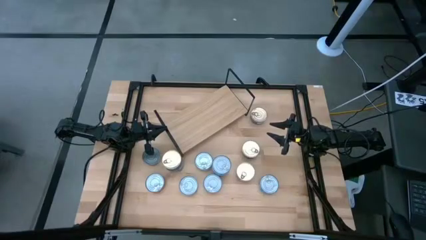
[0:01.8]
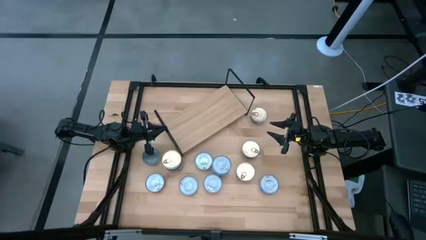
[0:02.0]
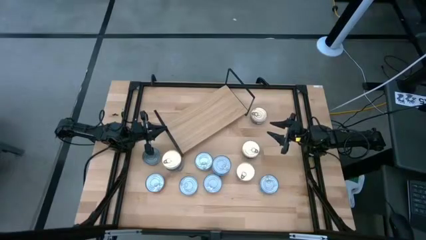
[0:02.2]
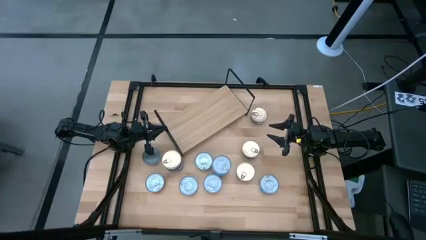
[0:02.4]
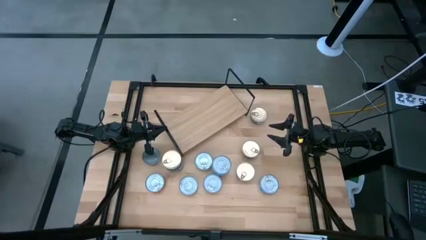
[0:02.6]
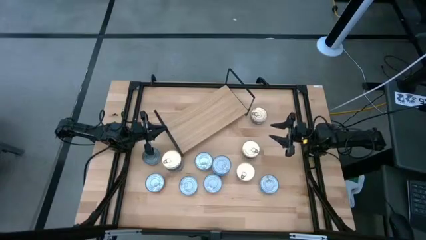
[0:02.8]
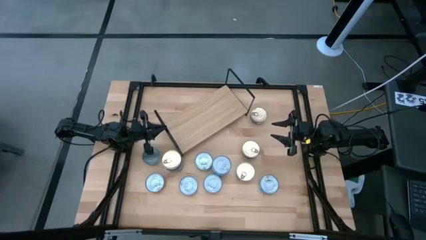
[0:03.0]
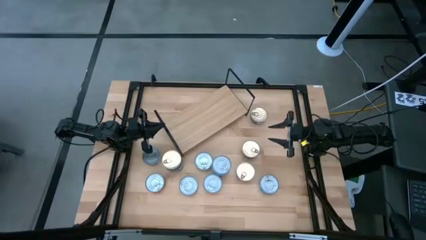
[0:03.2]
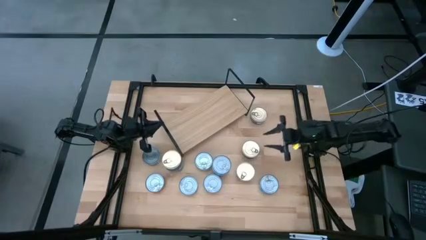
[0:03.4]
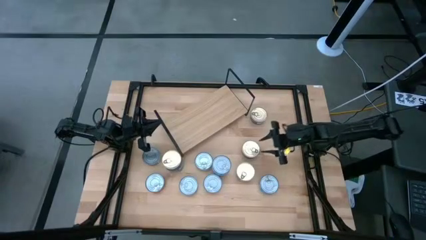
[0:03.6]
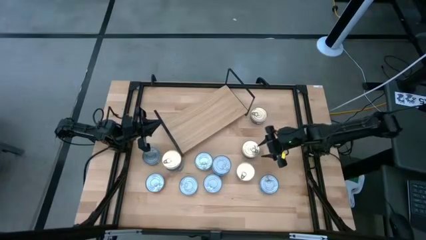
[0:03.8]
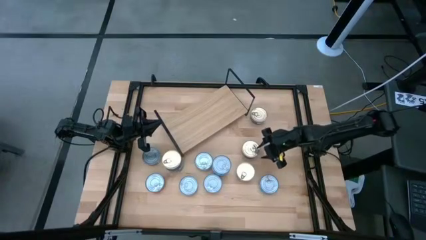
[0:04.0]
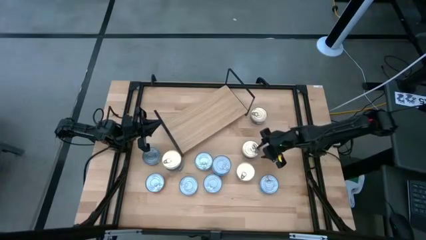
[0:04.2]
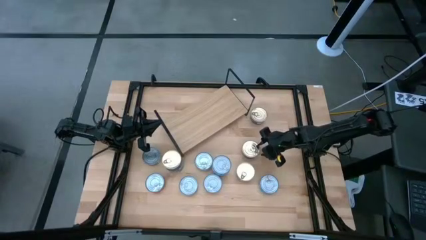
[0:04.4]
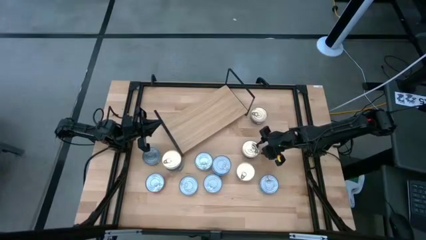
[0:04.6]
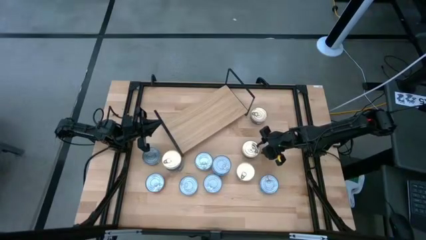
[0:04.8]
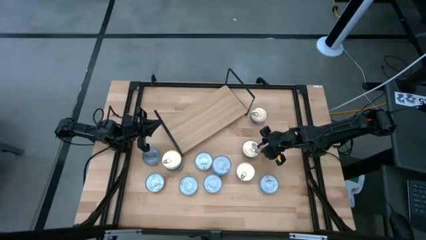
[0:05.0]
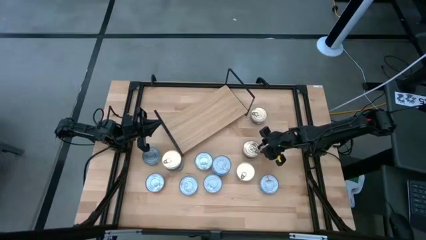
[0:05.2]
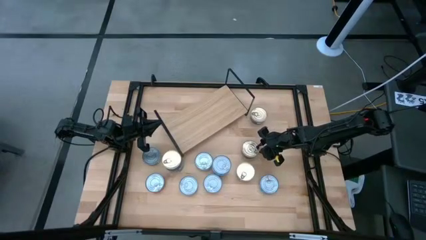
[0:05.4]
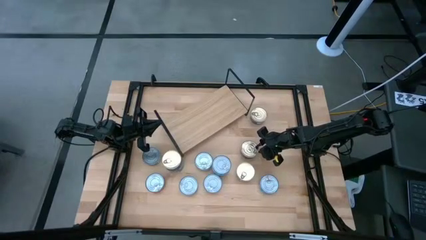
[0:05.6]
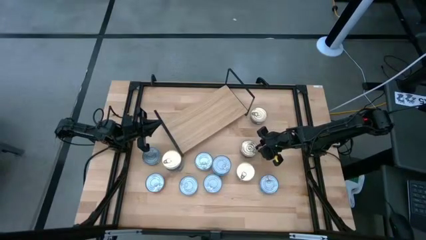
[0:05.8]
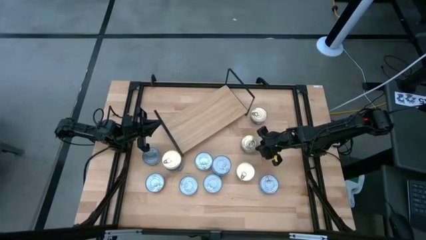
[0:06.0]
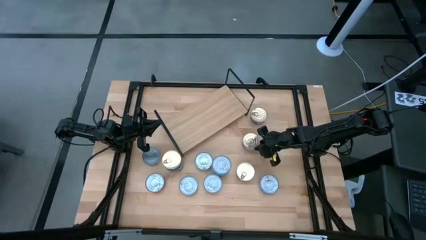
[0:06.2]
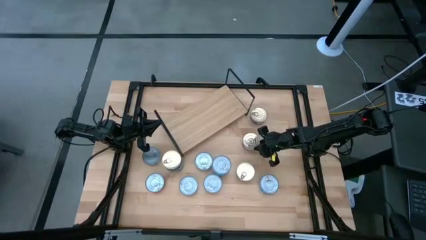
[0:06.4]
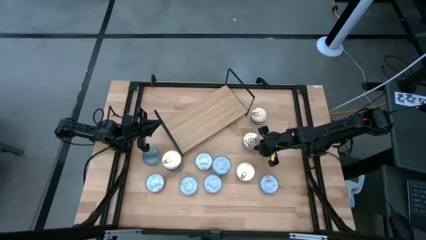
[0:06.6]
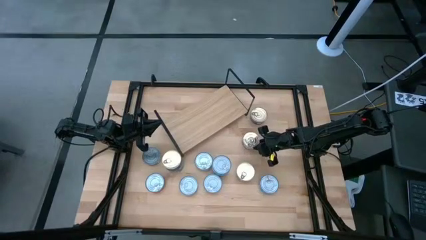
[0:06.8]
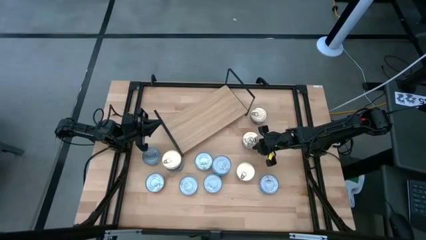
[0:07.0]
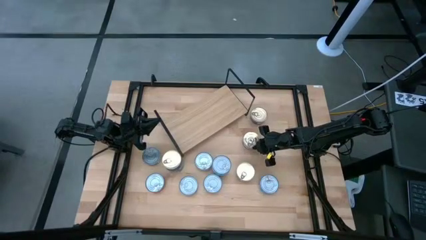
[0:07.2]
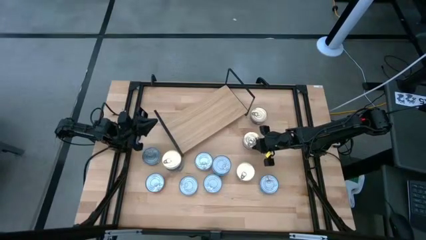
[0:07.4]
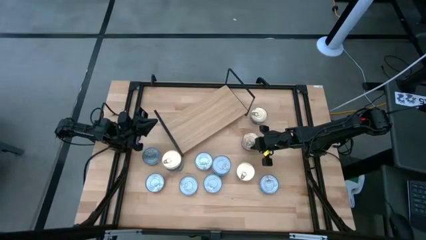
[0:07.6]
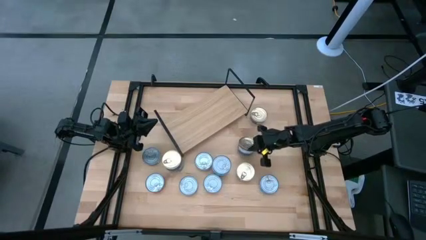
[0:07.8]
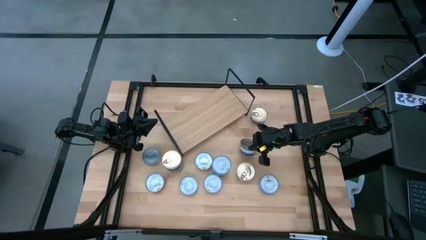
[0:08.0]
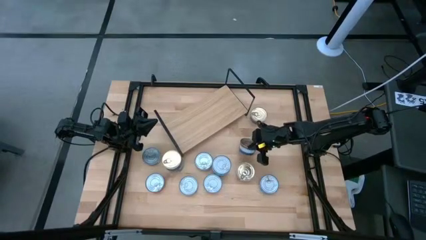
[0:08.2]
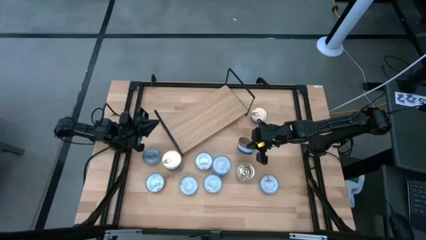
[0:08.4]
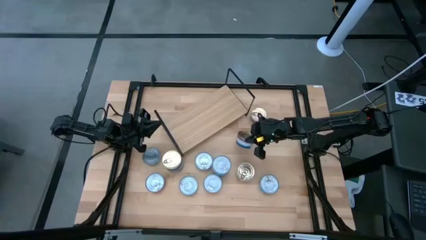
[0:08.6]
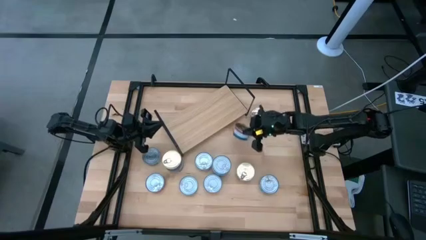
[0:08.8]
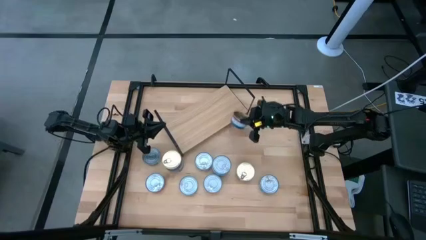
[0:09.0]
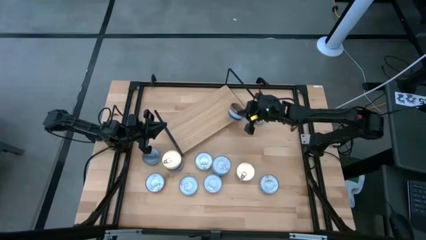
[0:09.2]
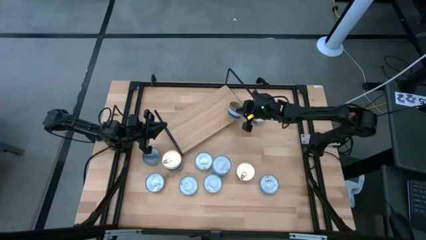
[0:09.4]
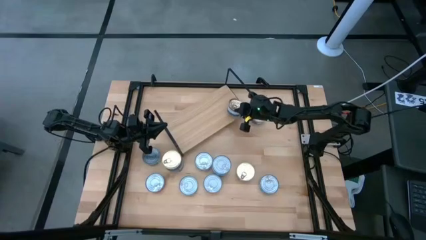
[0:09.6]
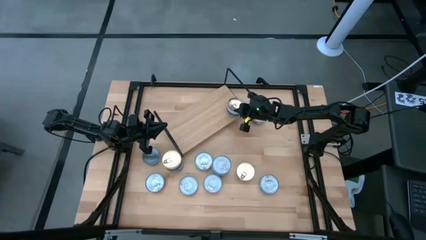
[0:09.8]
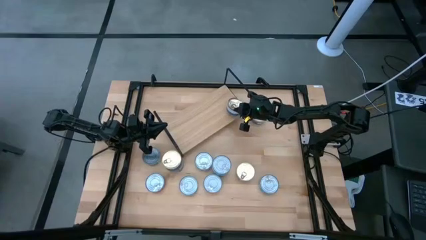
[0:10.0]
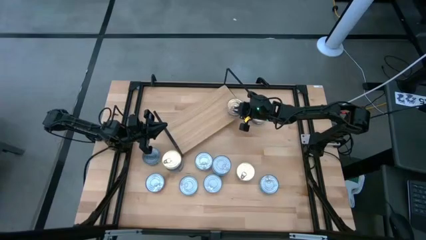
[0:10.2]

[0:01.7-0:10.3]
Task: Stack canned seafood by type on shelf
Put the blue pink tuna can on the shelf

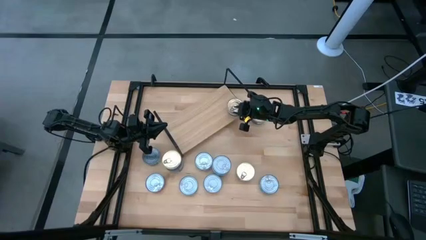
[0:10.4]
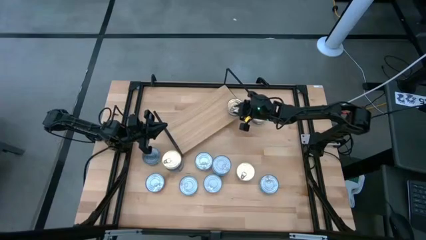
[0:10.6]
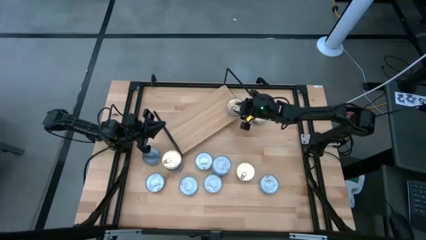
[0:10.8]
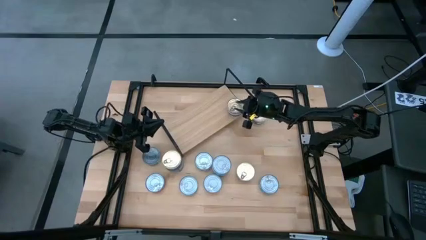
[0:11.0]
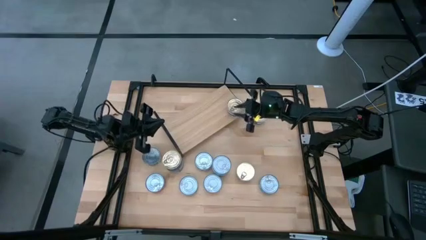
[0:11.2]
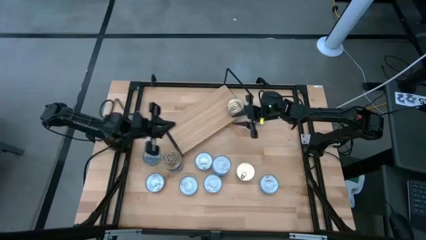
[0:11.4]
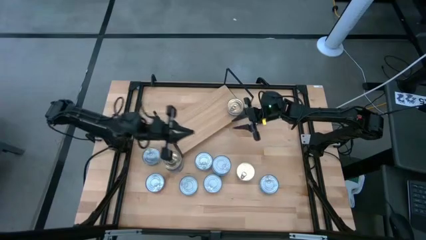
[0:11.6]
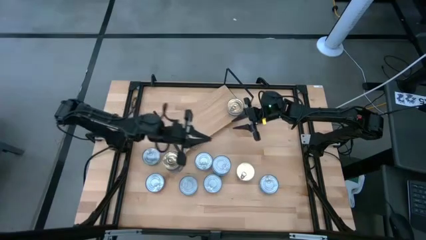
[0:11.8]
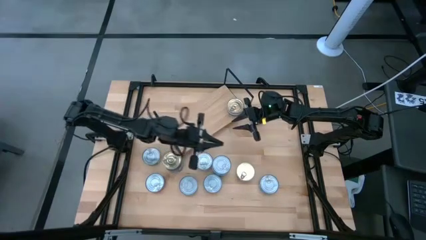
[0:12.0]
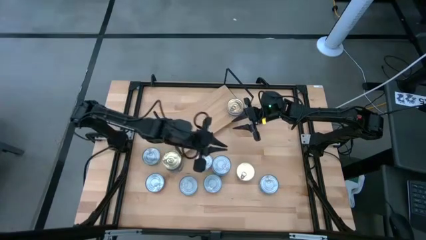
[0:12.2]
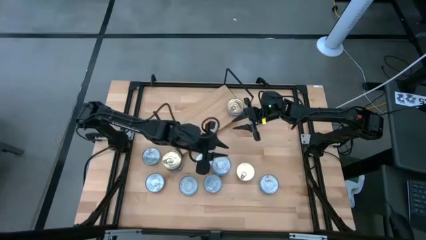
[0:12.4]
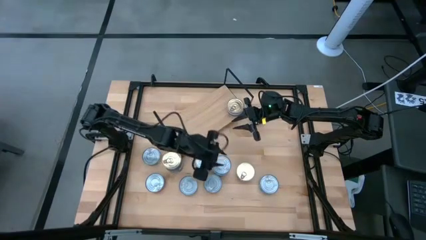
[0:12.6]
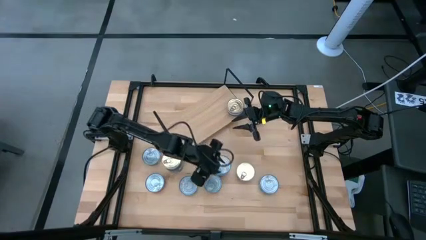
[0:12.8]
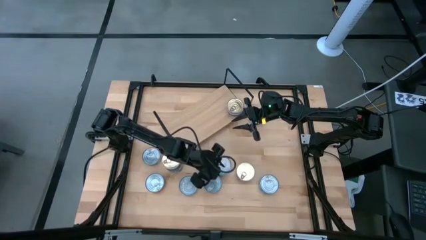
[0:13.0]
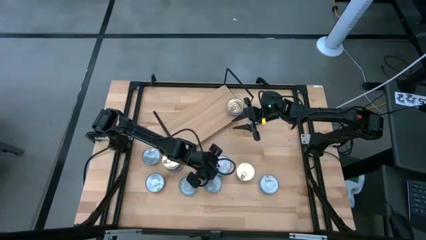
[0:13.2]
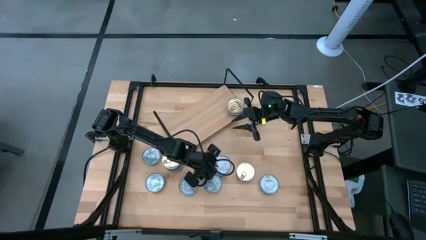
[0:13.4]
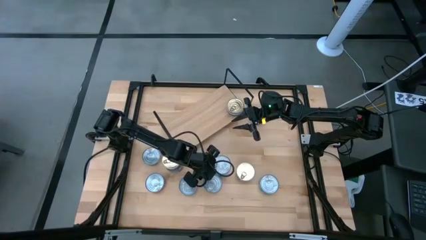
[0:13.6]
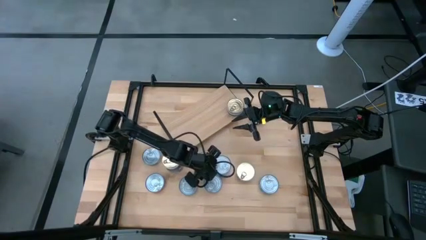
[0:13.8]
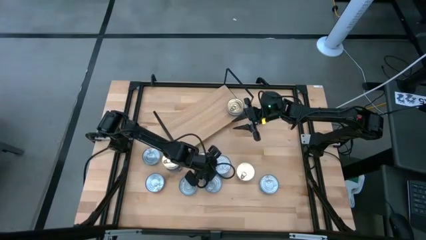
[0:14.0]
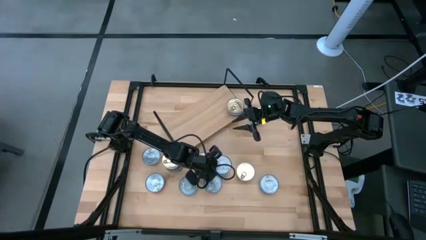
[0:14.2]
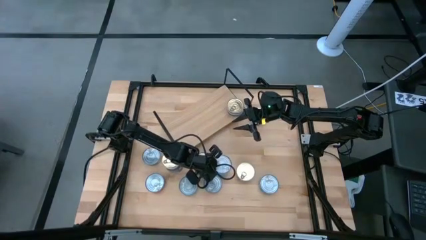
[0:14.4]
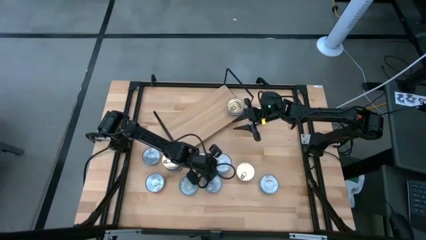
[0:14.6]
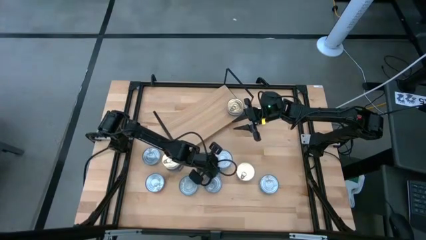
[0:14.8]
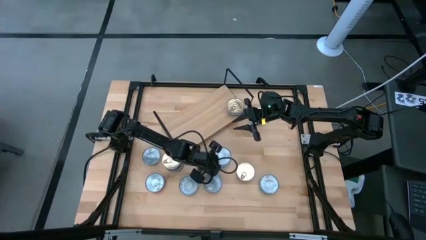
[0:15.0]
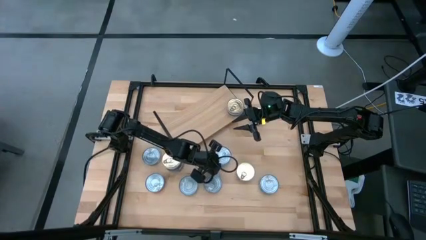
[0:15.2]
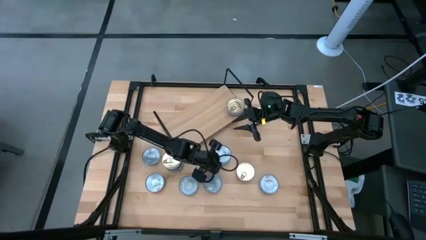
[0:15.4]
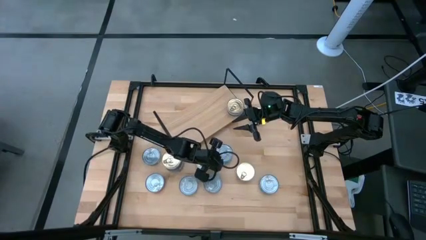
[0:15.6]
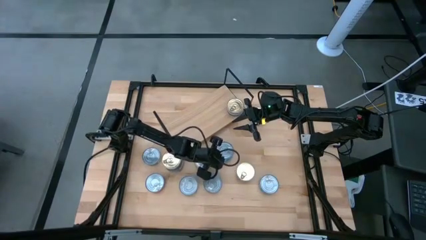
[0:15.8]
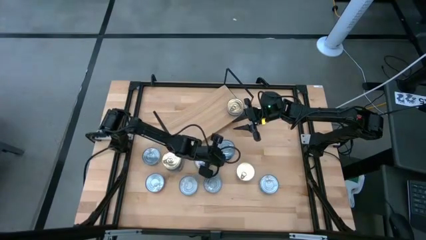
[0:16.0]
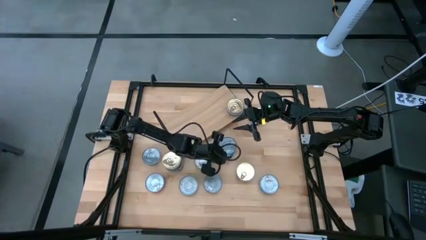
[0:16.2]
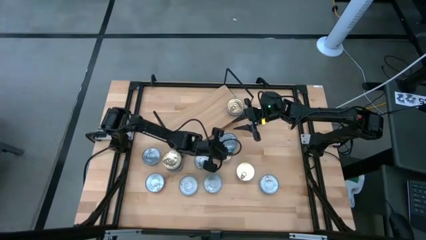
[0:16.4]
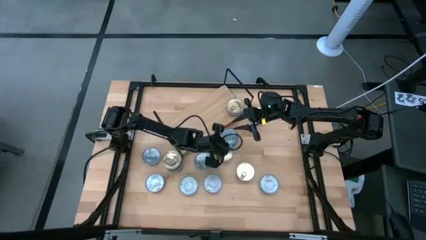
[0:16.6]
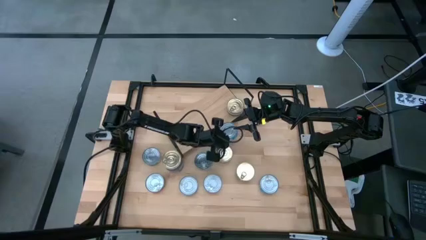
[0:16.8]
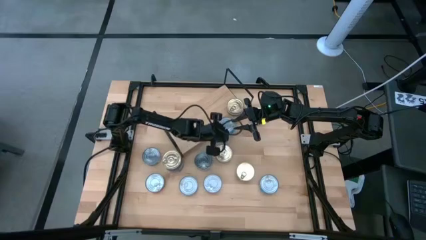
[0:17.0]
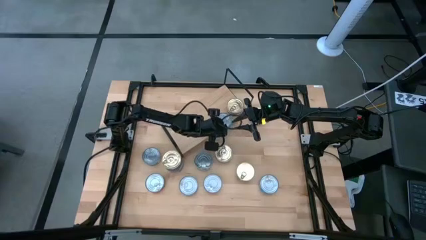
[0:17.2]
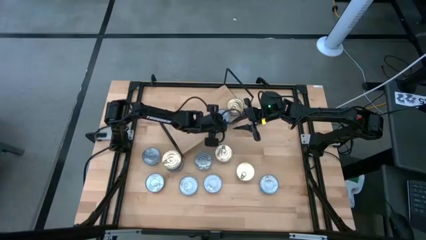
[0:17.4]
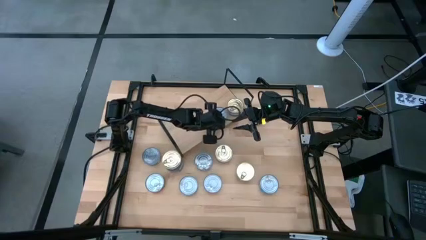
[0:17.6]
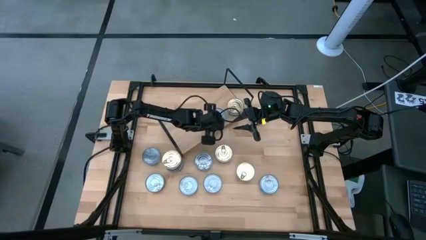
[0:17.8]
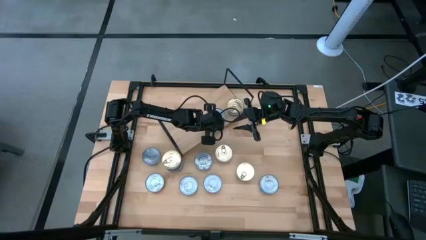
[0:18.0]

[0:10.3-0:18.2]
Put the yellow blue tuna can on the shelf

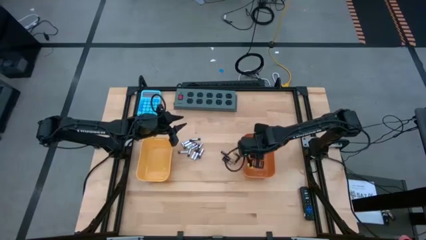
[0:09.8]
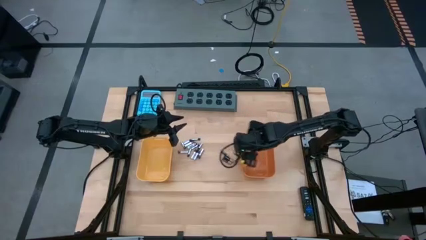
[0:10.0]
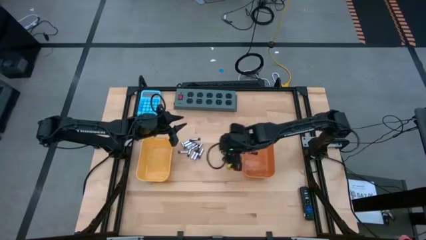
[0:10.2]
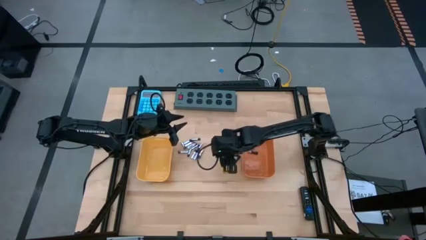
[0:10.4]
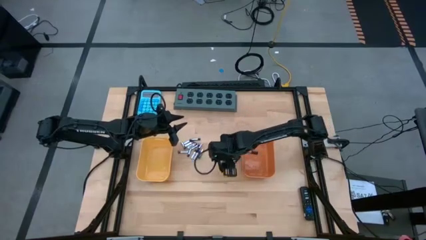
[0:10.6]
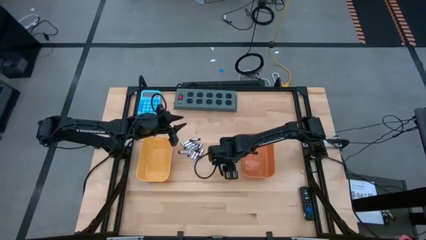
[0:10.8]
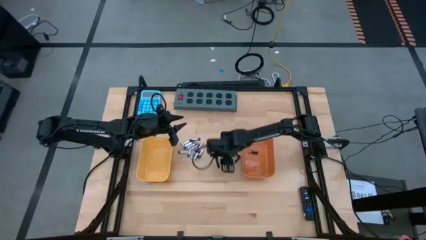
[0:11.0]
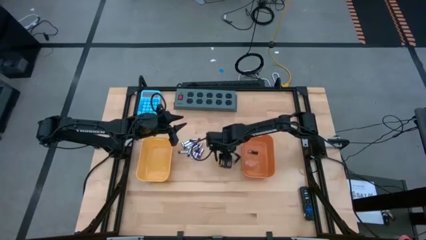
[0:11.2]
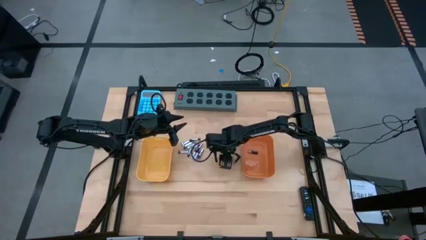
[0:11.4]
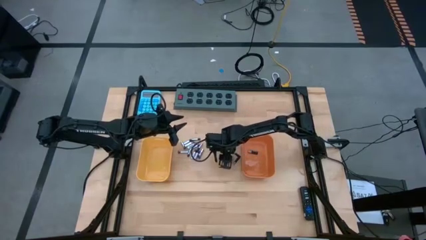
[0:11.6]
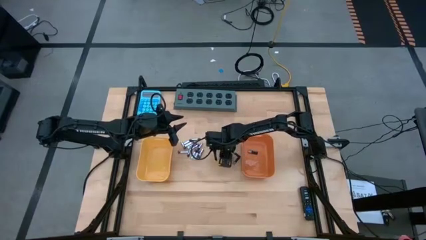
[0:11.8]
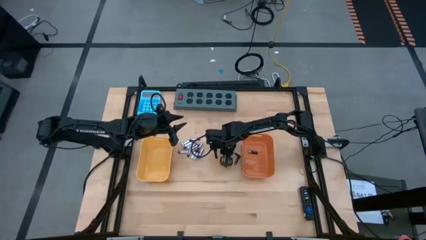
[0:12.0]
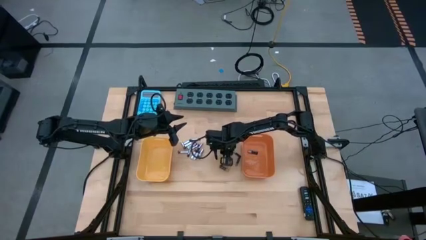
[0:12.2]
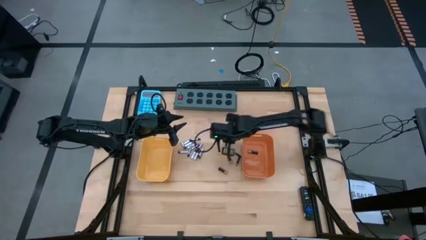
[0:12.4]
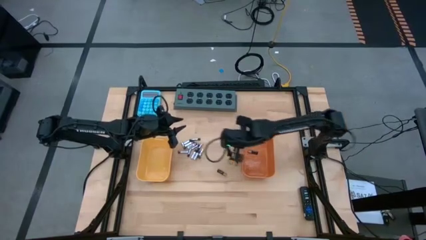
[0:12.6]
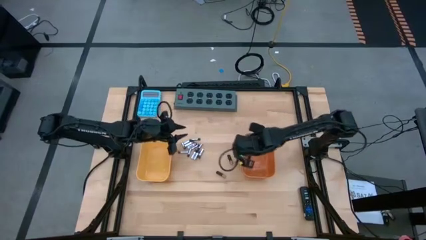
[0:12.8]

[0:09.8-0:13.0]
Task: Sort batteries
Put the black battery into the orange bin
